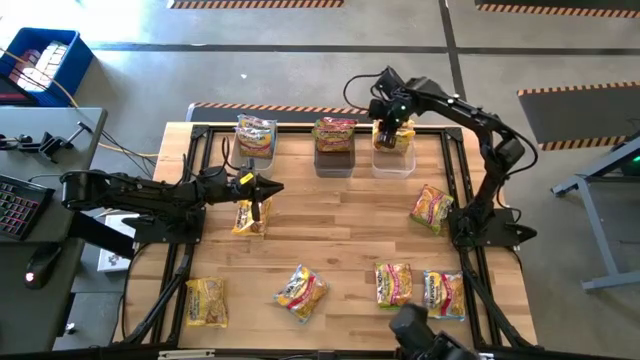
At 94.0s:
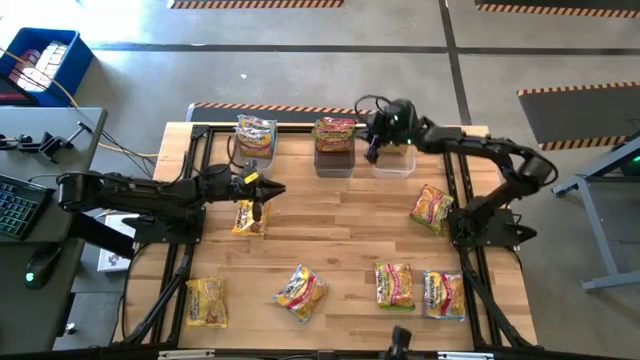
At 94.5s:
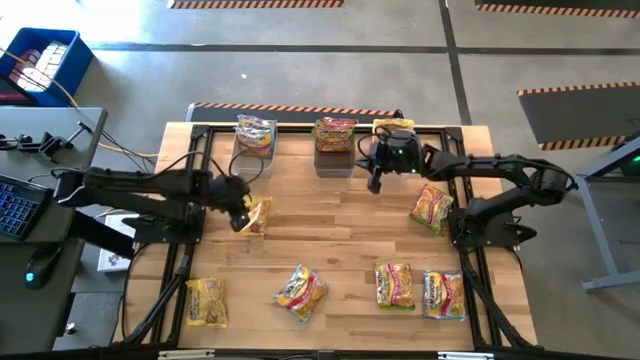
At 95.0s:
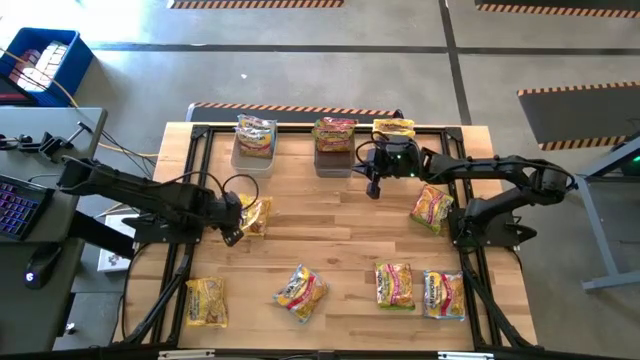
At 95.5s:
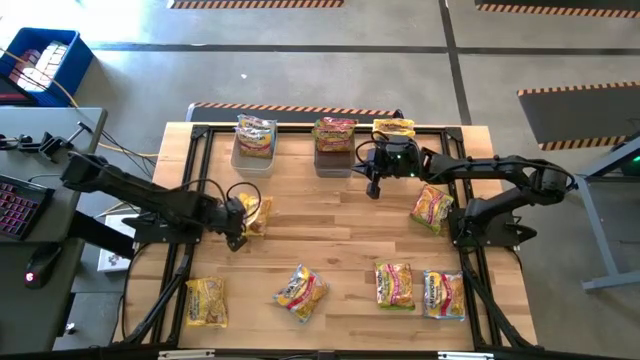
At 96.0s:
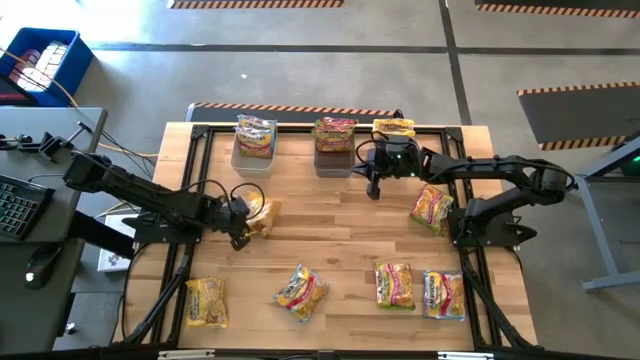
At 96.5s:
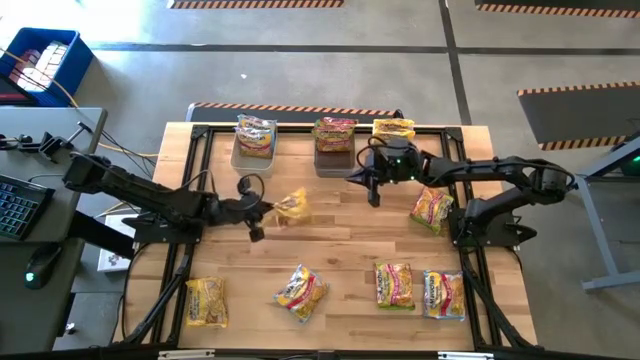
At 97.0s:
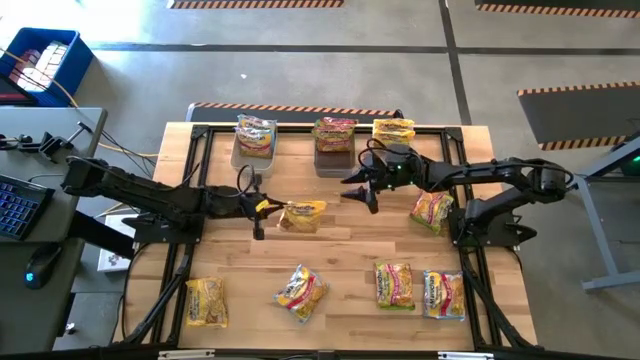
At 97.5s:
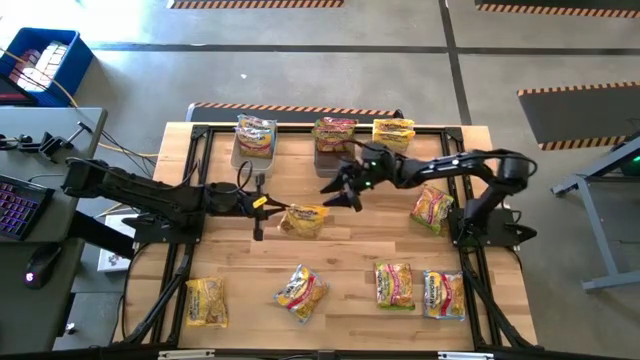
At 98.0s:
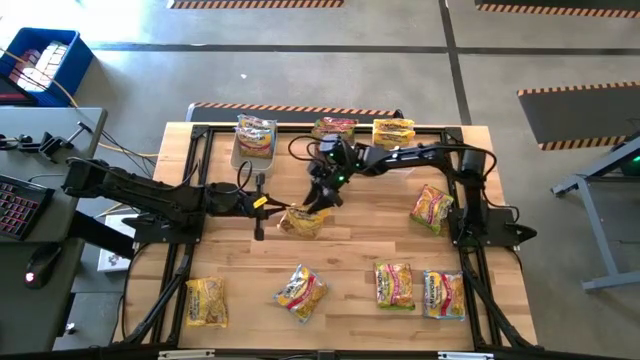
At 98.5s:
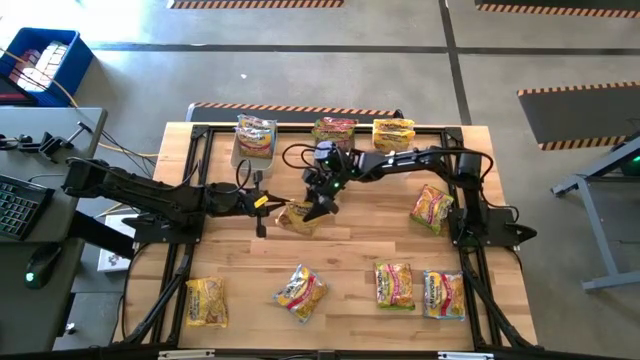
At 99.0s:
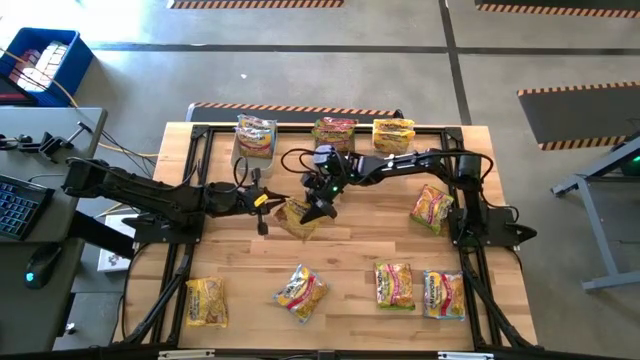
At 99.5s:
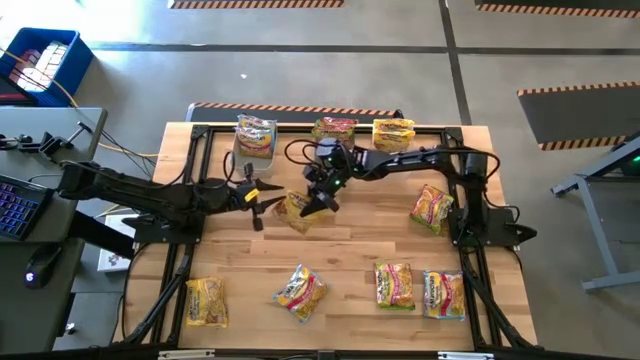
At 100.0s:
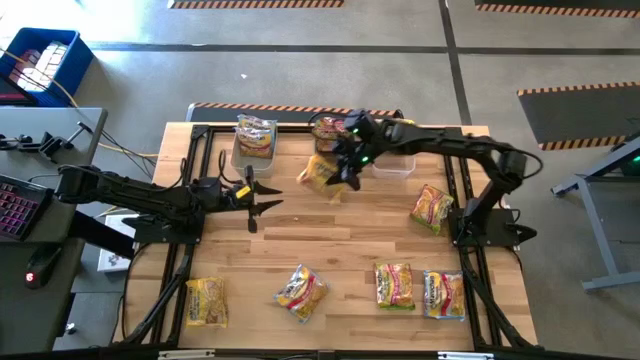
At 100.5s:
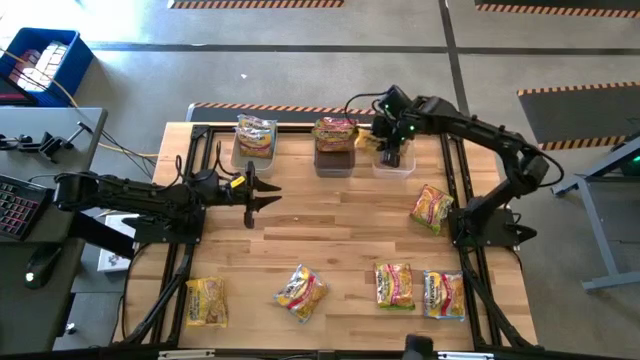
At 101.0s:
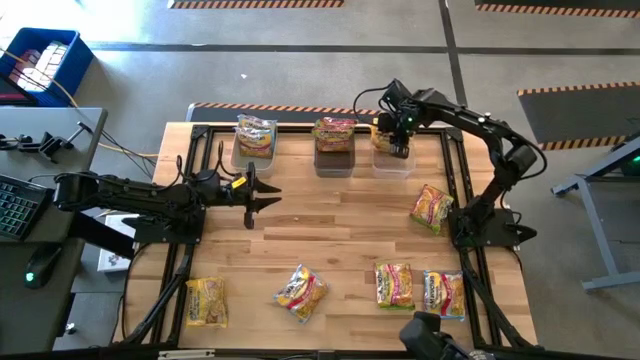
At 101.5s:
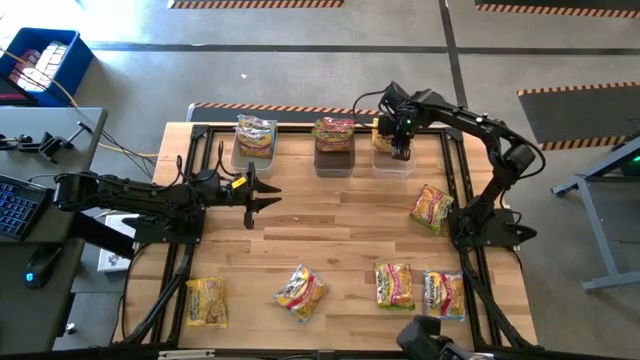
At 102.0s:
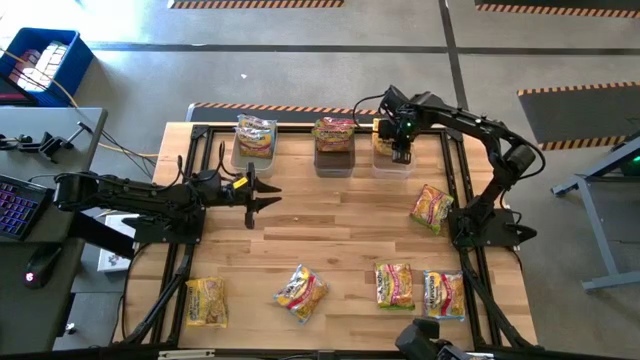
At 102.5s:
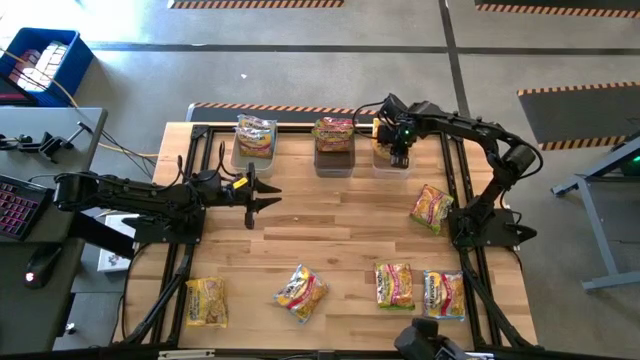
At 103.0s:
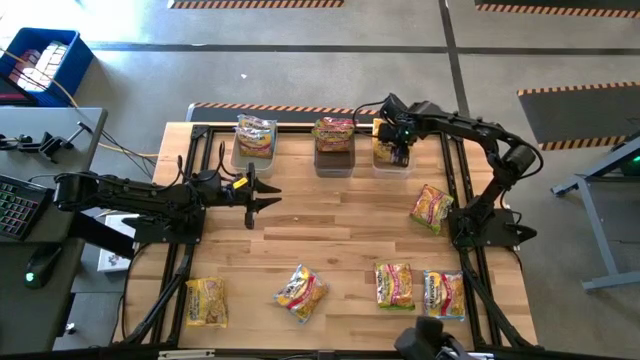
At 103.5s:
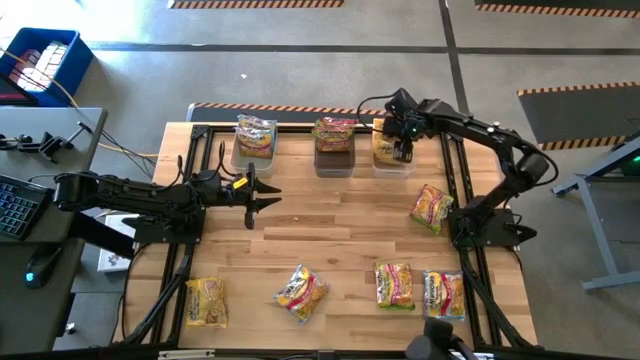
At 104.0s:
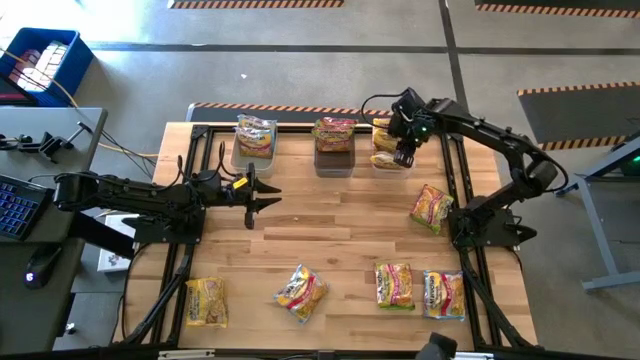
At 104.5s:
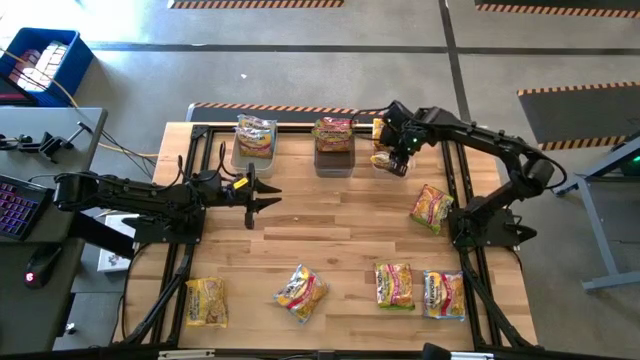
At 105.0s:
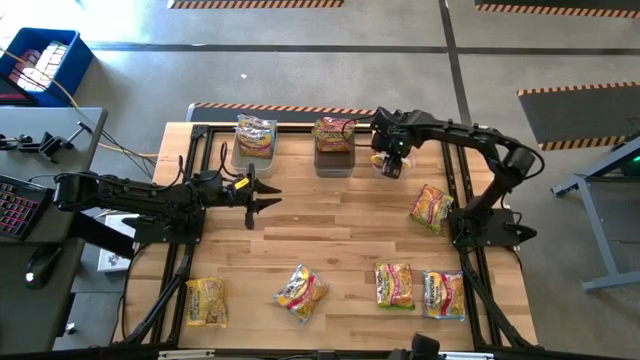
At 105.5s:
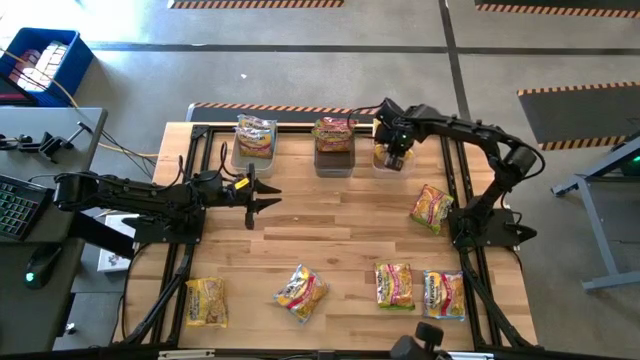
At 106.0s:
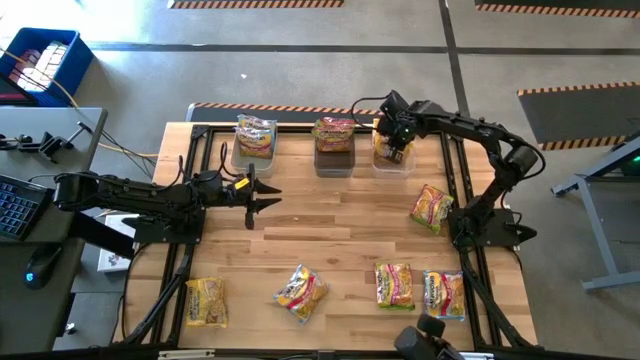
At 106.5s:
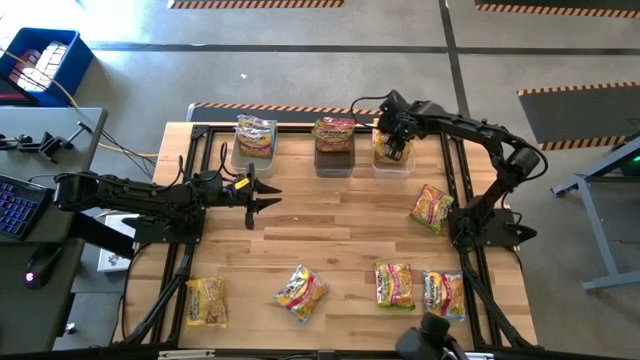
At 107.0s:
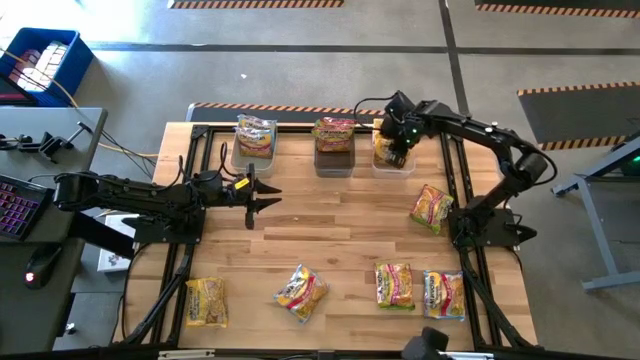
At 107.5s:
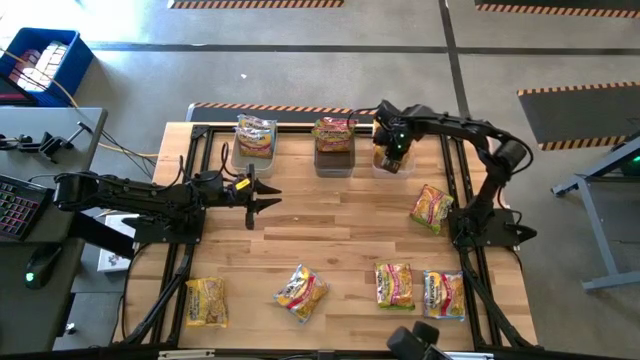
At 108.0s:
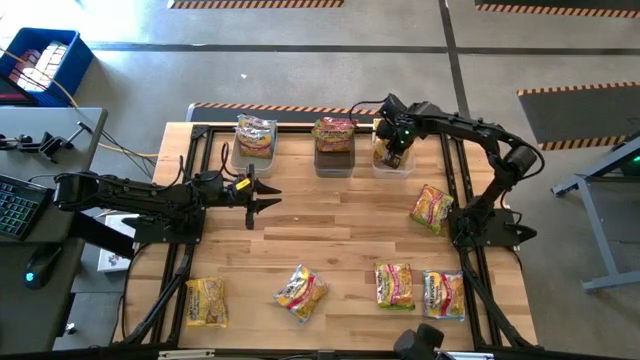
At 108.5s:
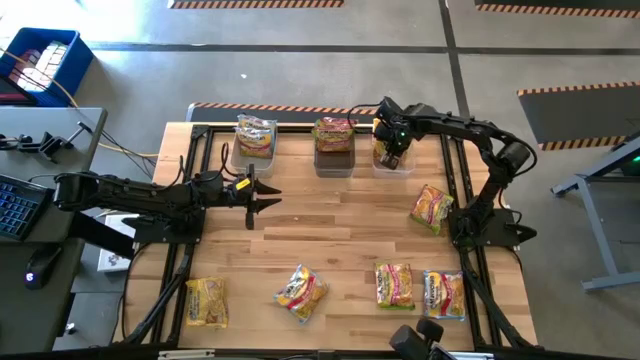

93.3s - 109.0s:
Task: Sort Maruchan noodles
Put the yellow noodle pack into the transparent bin

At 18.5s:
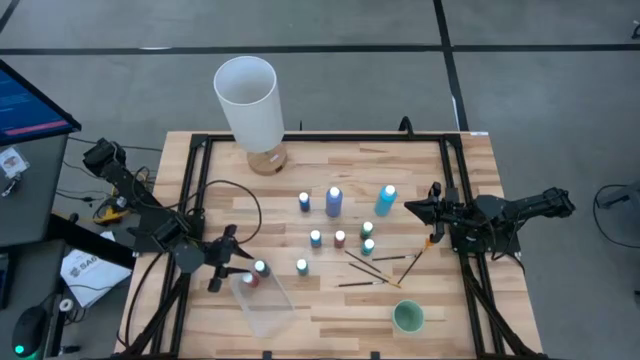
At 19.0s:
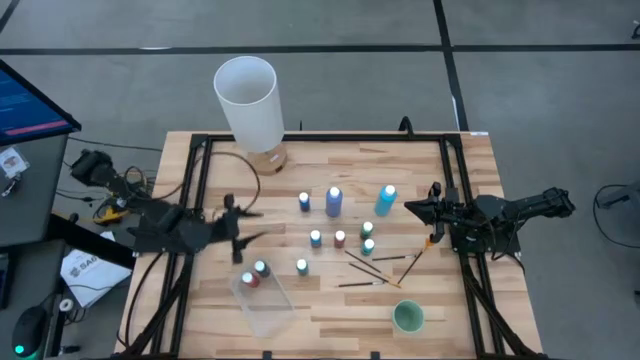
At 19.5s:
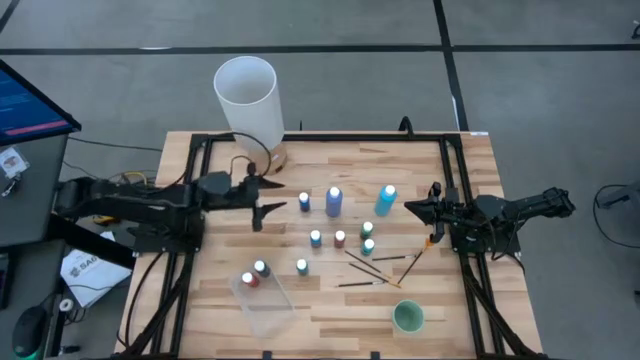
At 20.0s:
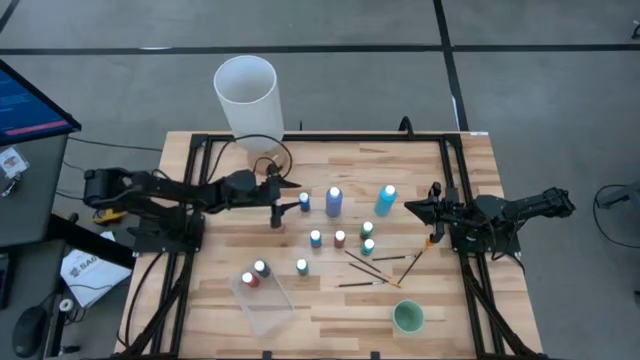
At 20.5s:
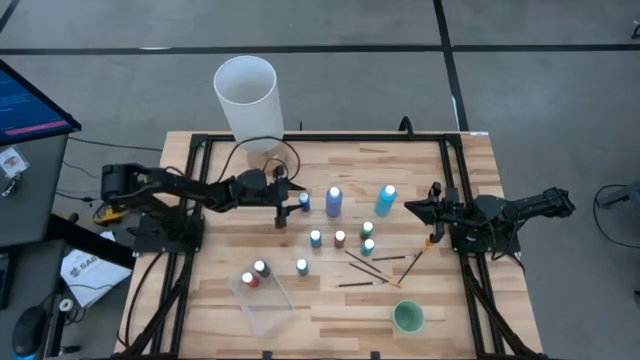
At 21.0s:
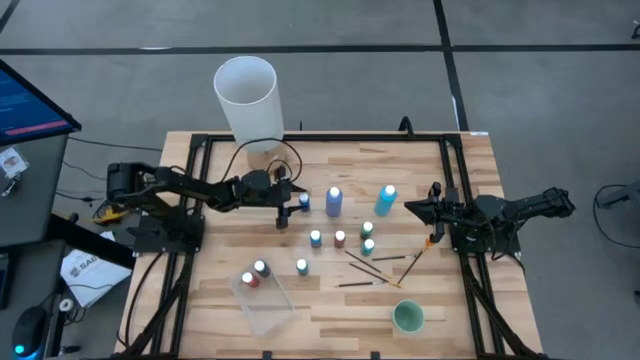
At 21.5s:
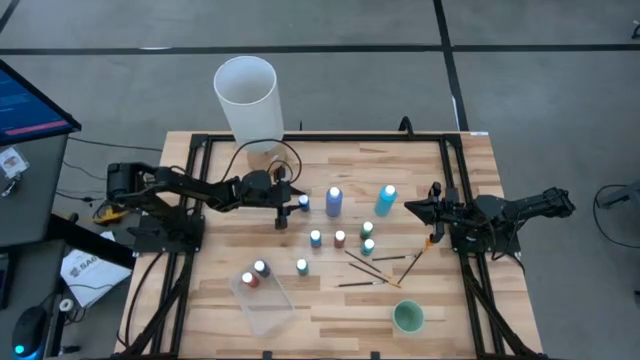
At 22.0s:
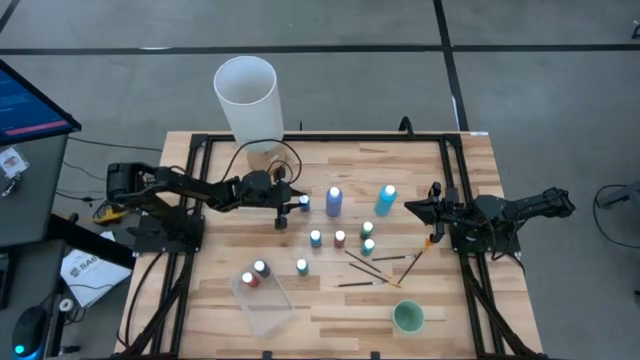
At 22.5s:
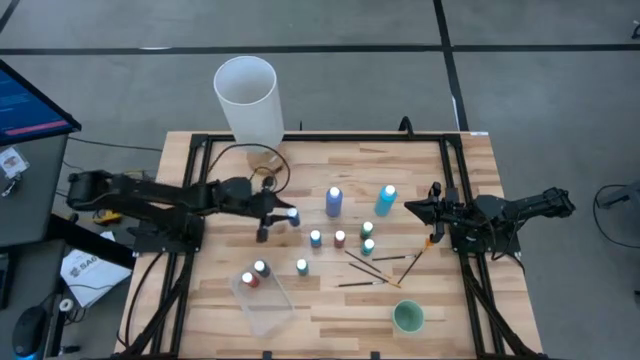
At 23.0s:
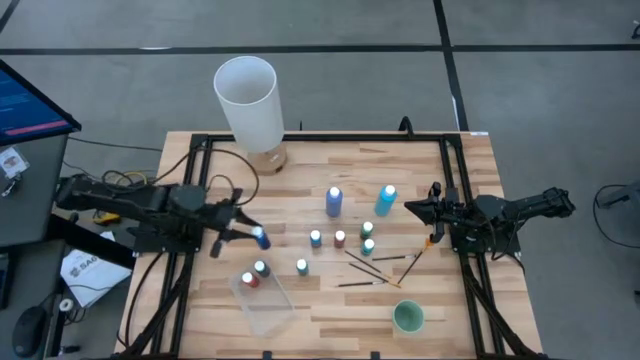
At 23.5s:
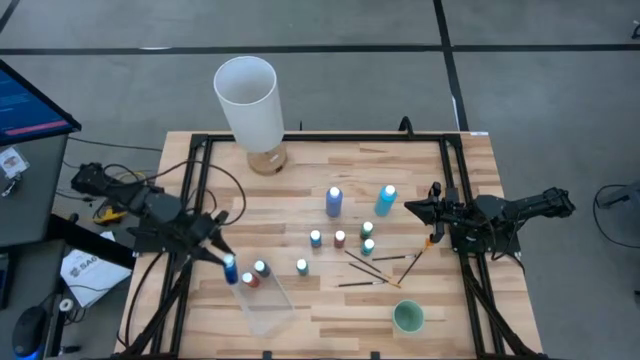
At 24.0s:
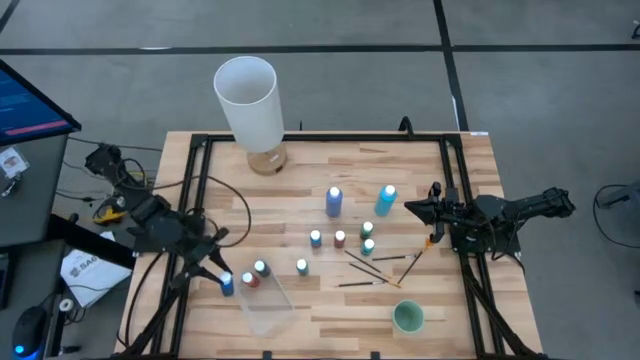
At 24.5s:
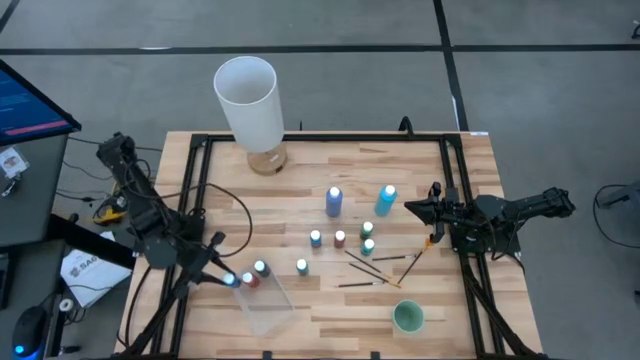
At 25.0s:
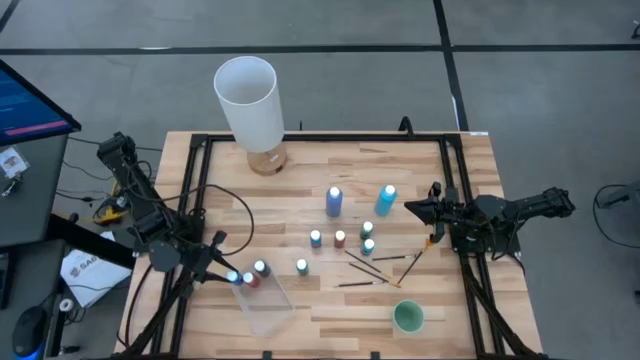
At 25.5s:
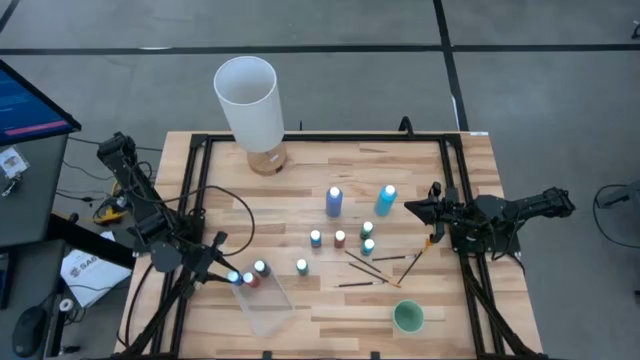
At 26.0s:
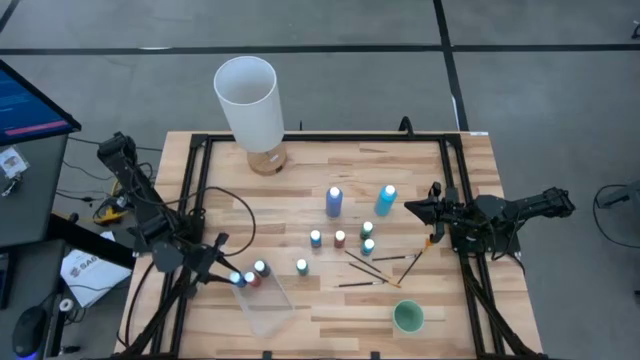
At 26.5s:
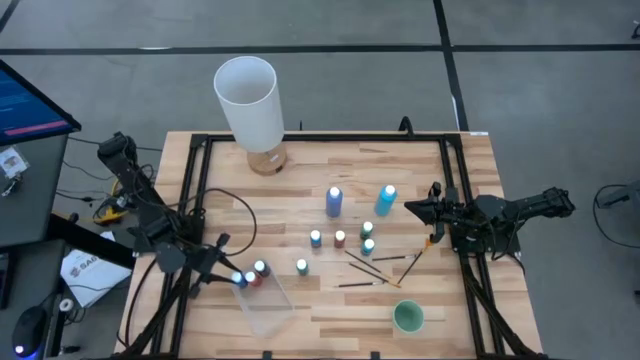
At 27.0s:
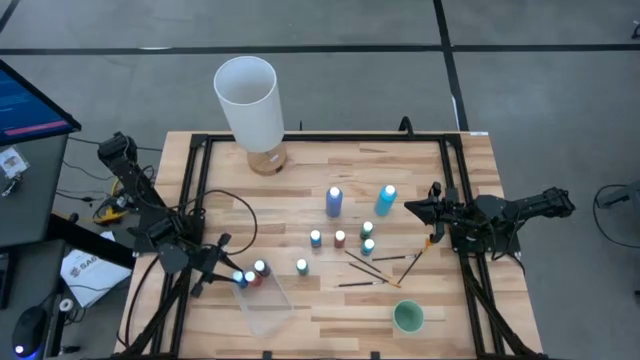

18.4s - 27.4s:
Task: Pick & Place Paint Supplies
Put the dark blue paint bottle into the transparent bin
